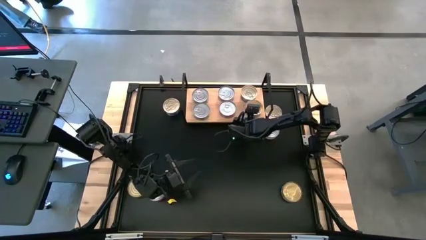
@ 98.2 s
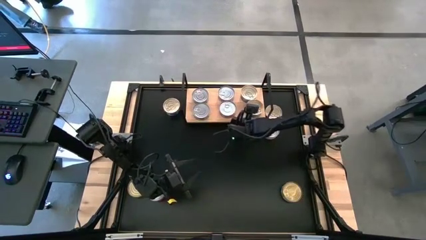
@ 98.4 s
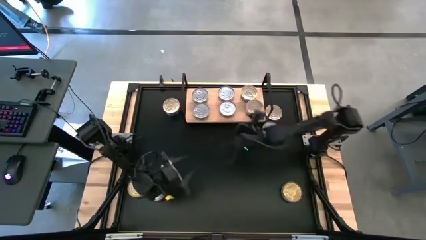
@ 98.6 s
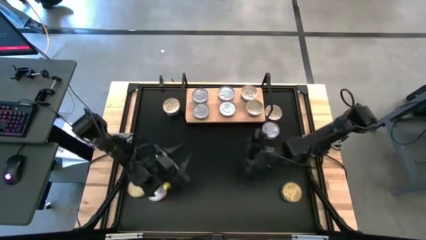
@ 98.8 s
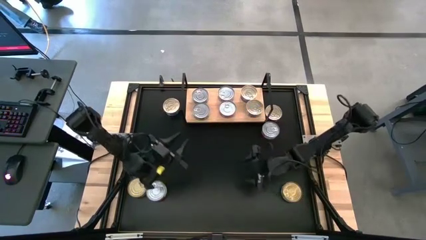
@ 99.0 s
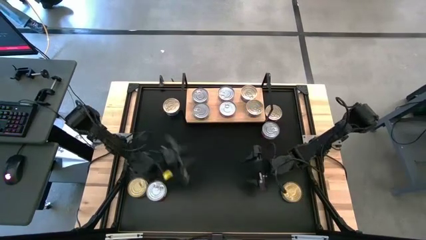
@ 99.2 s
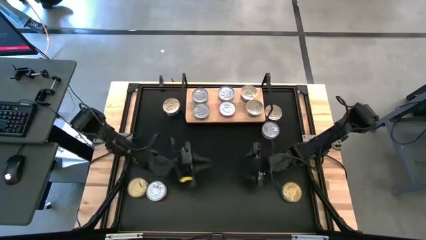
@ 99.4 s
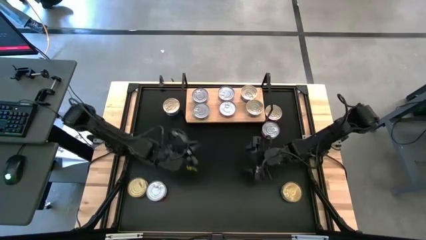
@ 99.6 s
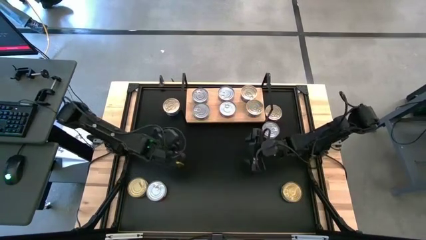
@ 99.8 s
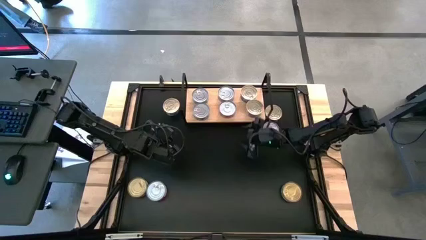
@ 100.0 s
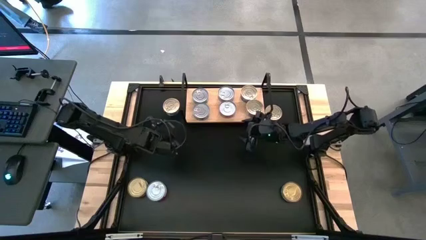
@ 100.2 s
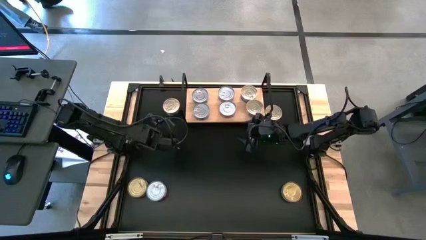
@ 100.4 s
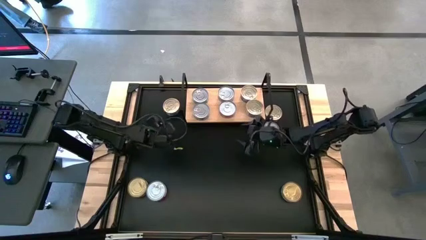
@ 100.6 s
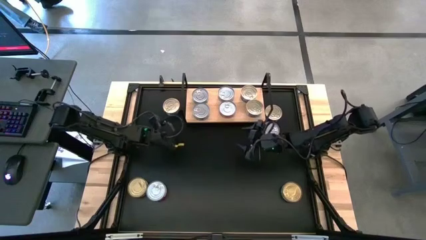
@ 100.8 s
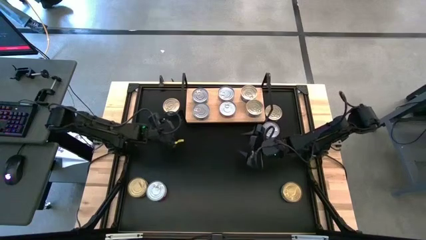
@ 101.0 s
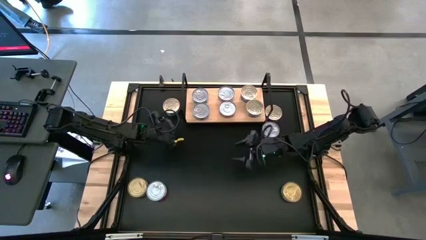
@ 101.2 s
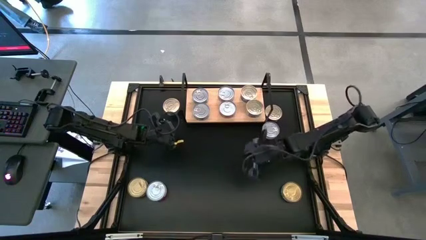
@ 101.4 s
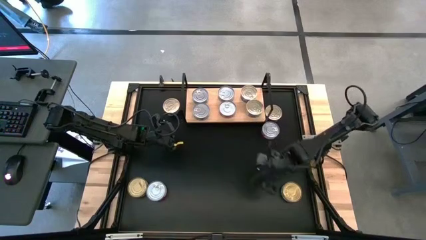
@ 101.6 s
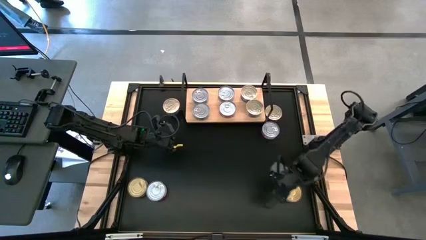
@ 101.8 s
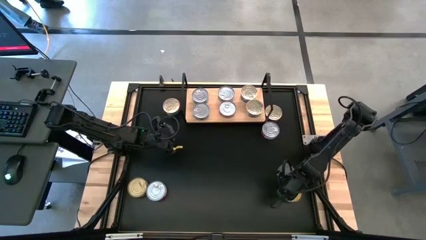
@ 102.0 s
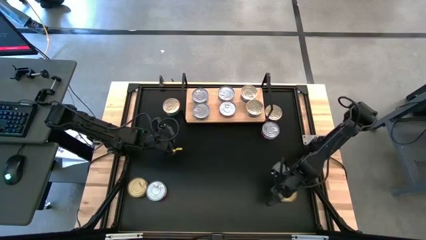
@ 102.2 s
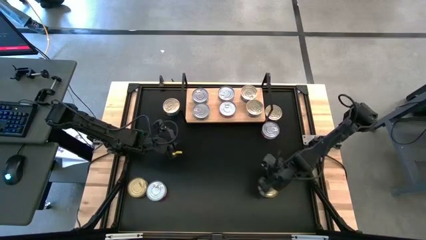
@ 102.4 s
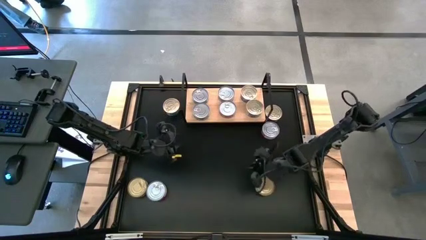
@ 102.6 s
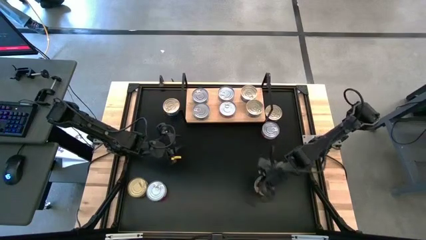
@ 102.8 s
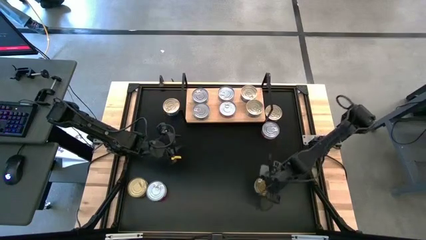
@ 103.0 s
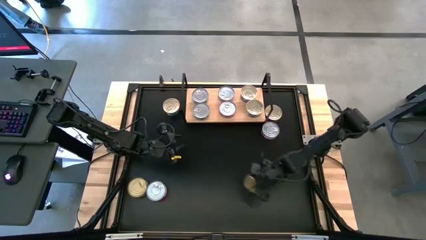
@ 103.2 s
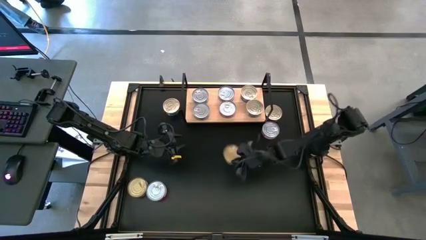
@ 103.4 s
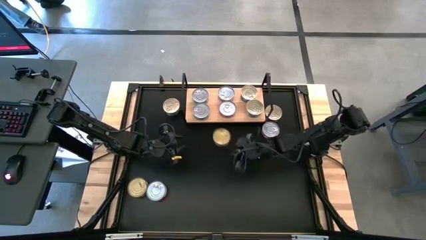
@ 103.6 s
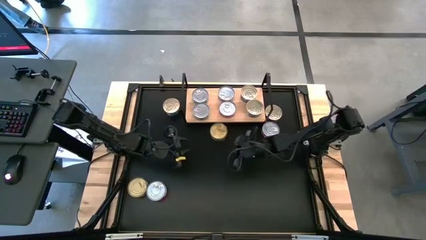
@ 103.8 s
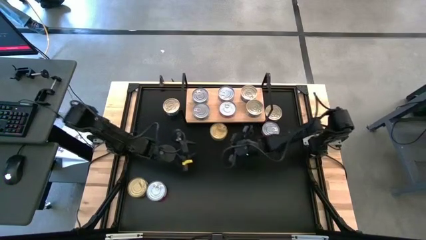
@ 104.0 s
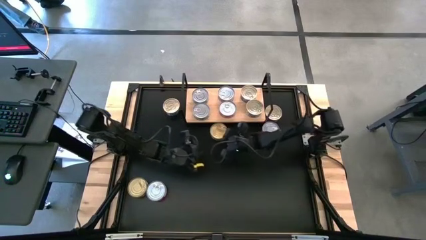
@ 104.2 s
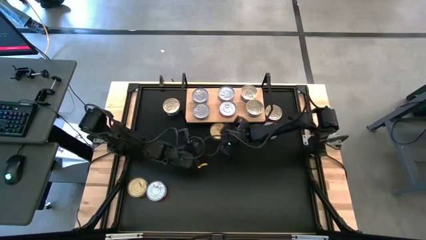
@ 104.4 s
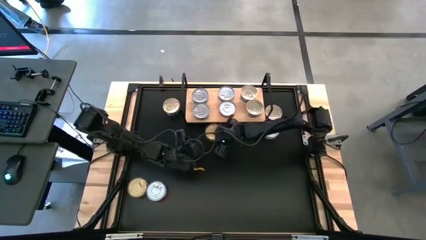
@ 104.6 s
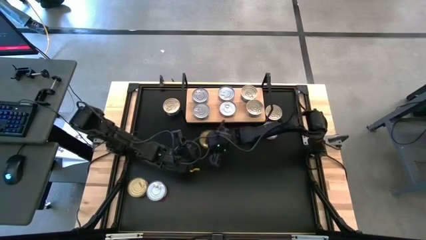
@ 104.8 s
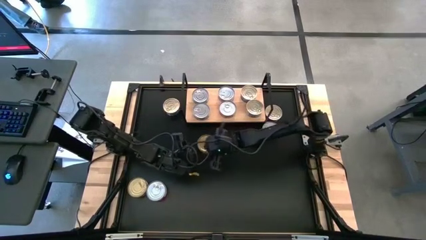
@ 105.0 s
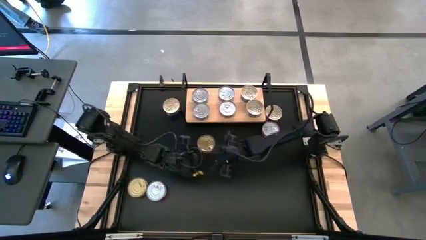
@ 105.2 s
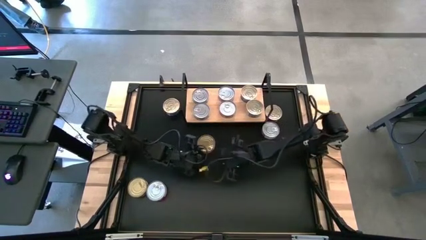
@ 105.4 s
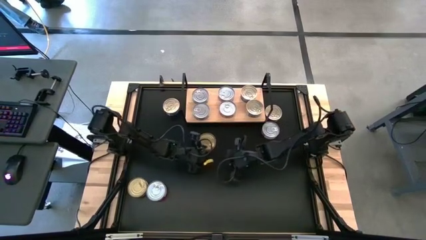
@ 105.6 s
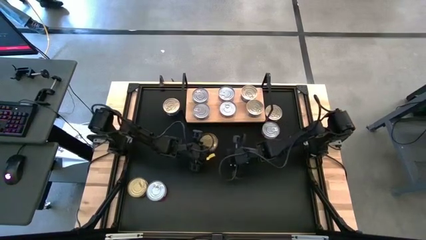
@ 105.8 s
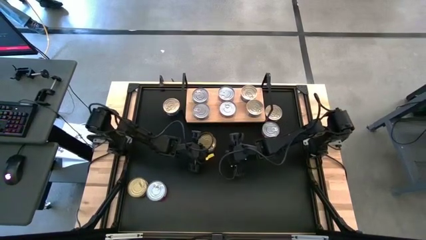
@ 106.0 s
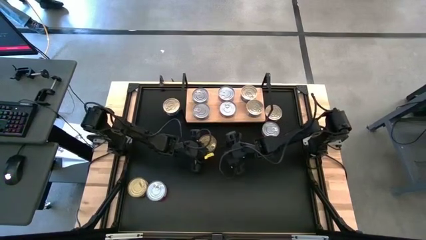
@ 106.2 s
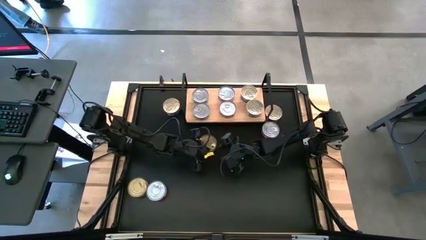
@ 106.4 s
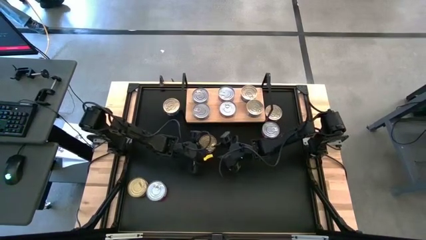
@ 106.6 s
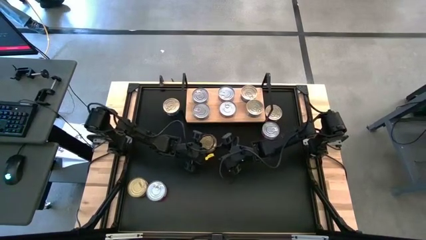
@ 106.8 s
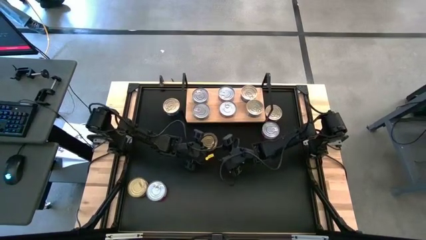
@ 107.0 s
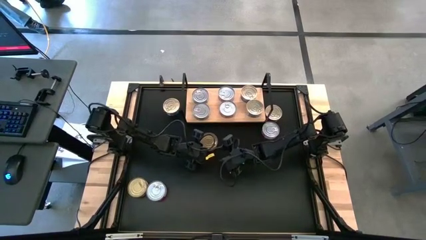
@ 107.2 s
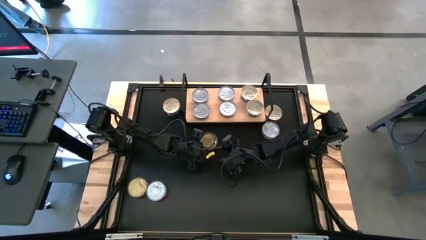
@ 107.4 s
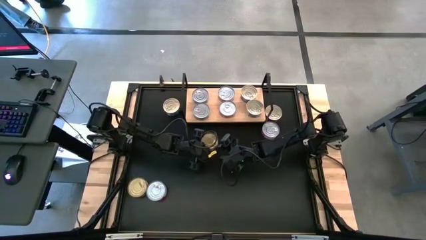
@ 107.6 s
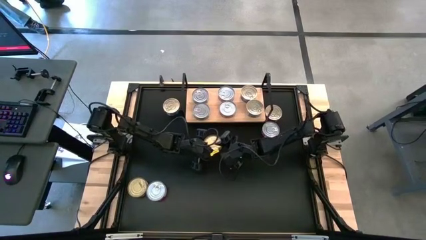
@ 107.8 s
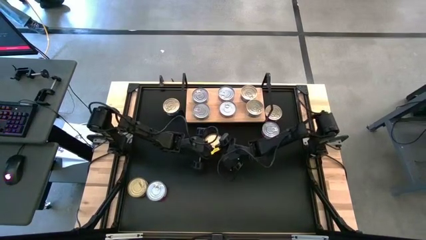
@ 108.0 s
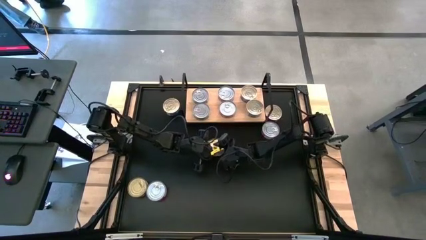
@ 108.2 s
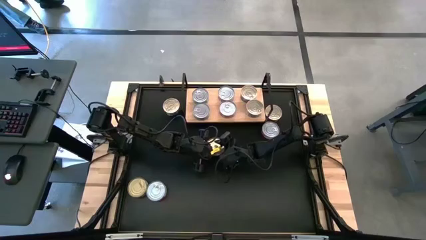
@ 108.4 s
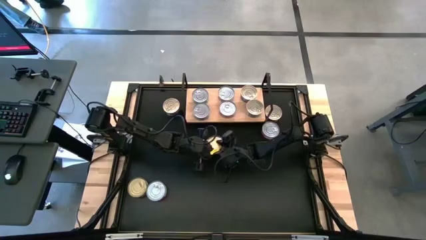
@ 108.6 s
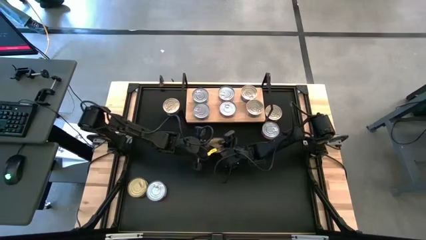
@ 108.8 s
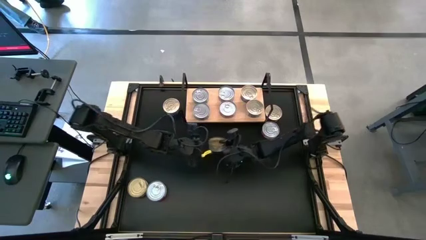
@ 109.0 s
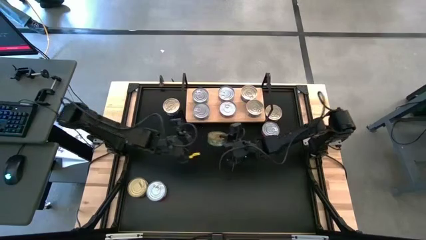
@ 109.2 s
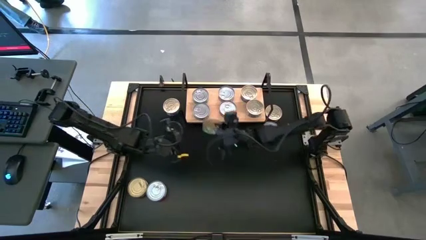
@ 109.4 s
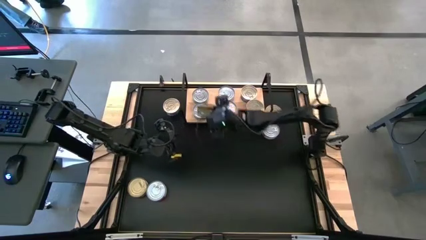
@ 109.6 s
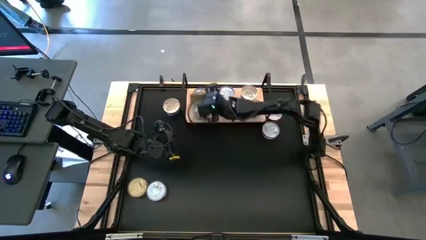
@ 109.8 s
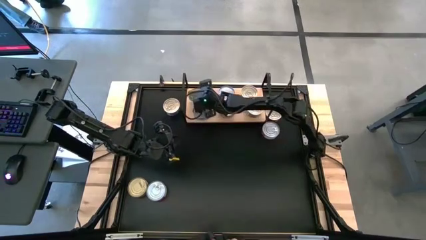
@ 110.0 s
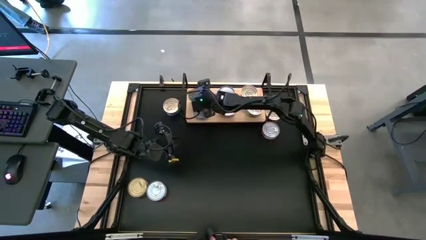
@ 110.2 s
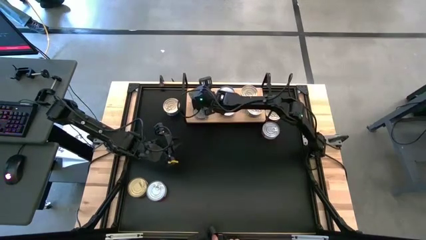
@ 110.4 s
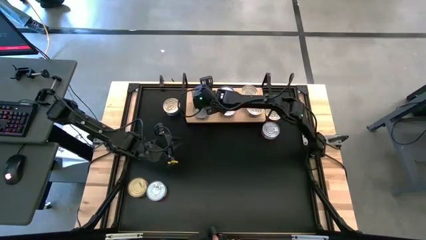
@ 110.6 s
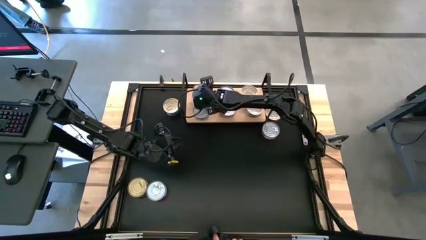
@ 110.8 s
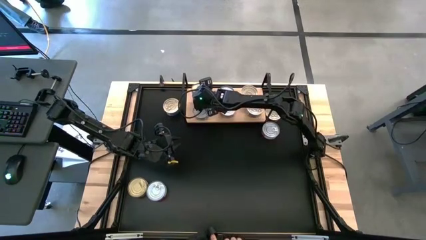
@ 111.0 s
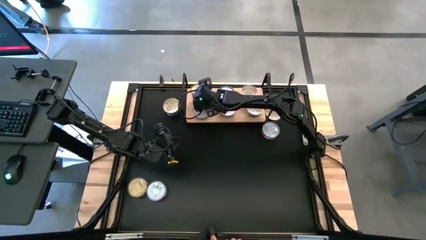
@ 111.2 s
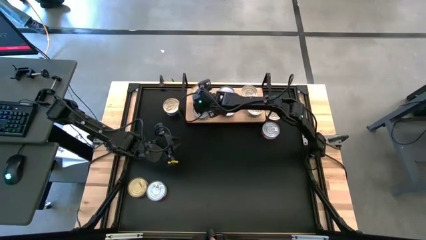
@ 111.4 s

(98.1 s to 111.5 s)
Task: Stack canned seafood by type on shelf
Stack the green tuna can on top of the green tuna can
